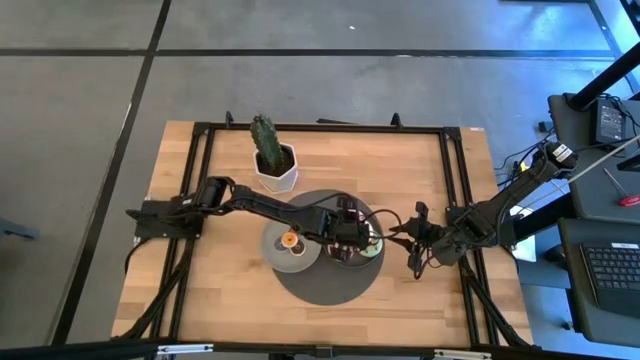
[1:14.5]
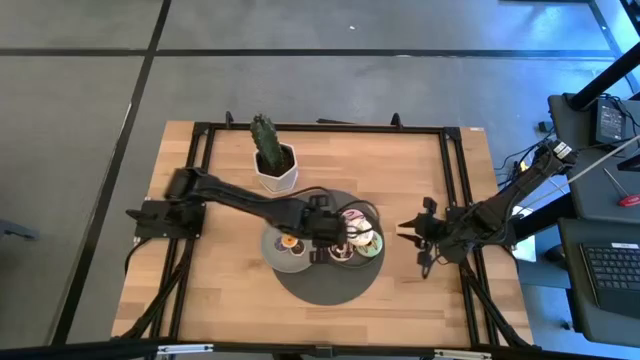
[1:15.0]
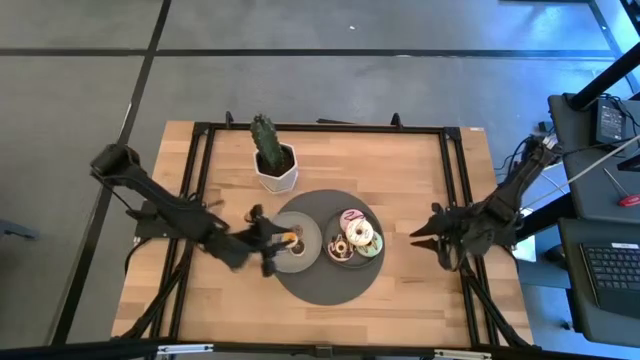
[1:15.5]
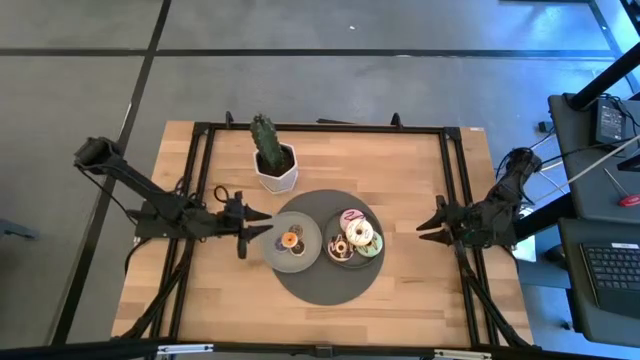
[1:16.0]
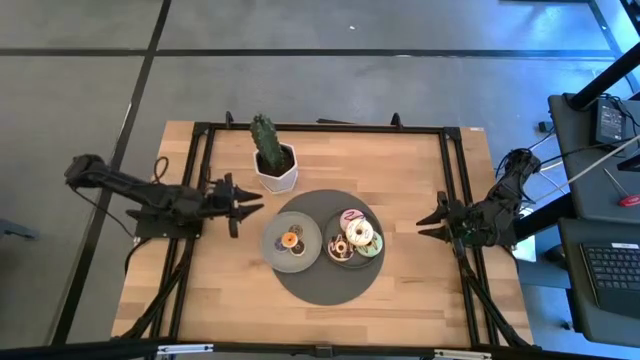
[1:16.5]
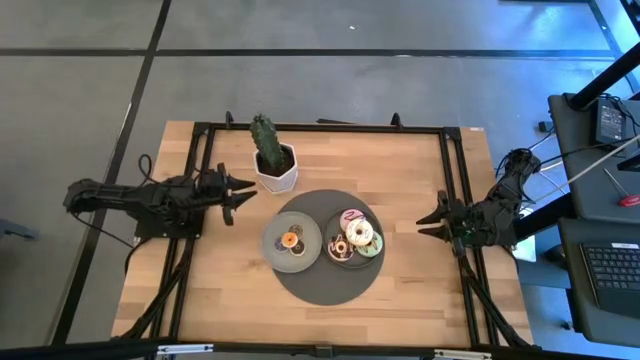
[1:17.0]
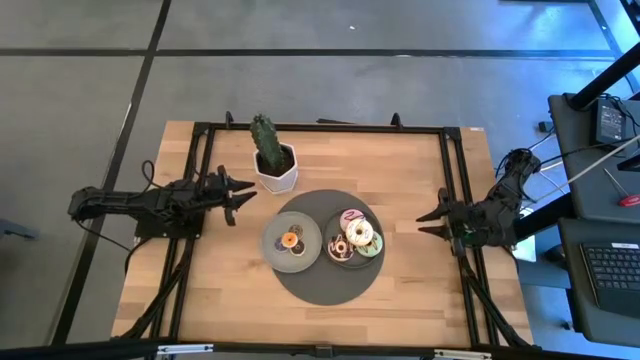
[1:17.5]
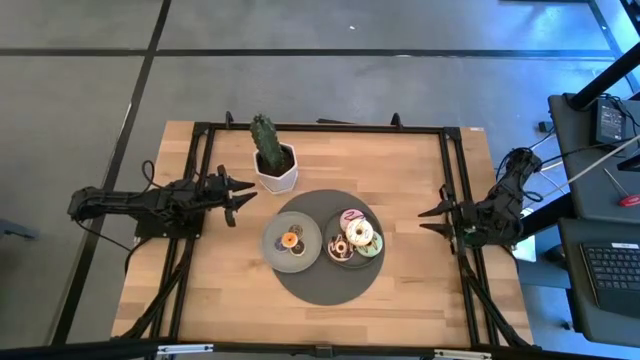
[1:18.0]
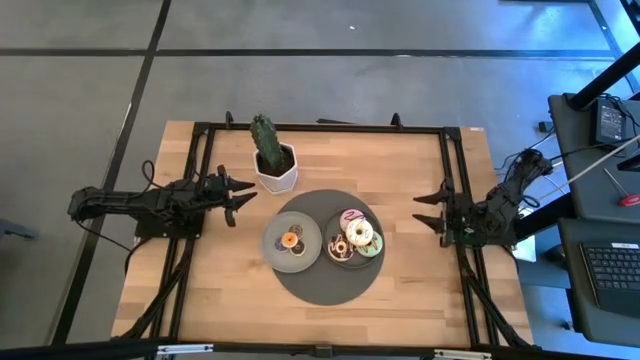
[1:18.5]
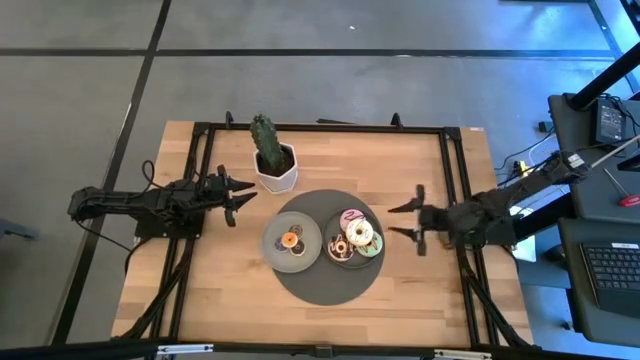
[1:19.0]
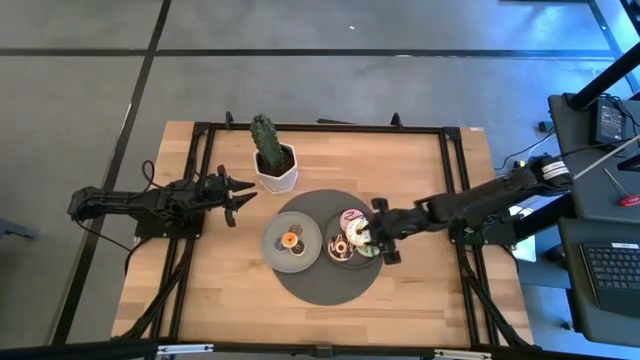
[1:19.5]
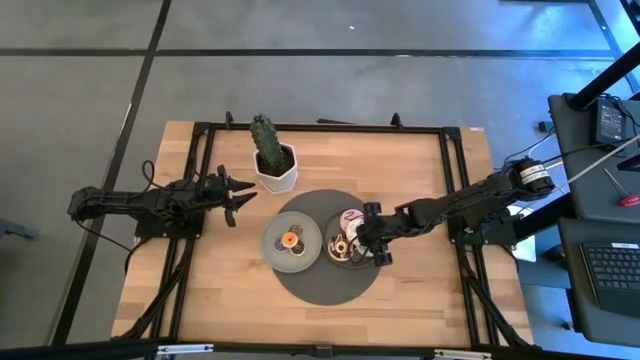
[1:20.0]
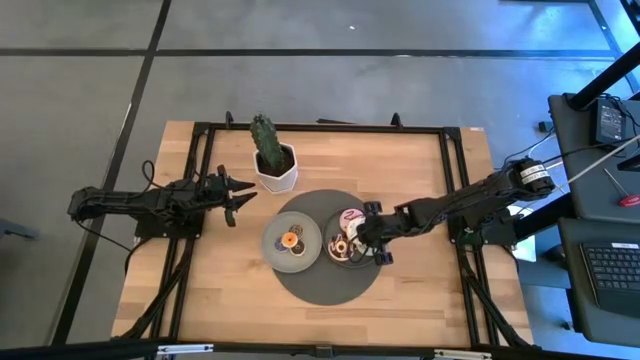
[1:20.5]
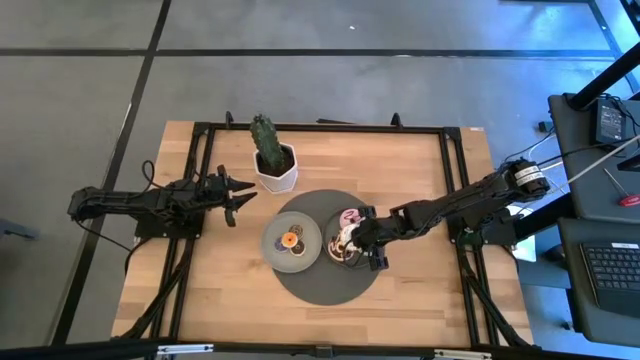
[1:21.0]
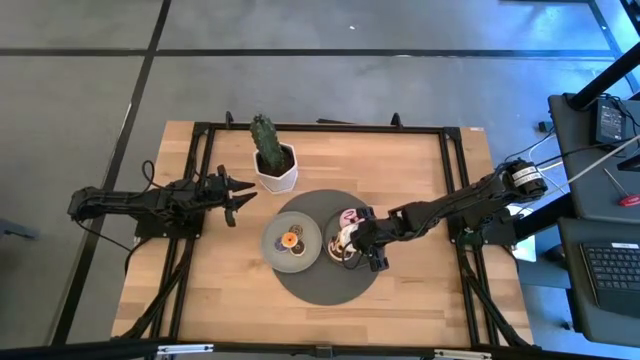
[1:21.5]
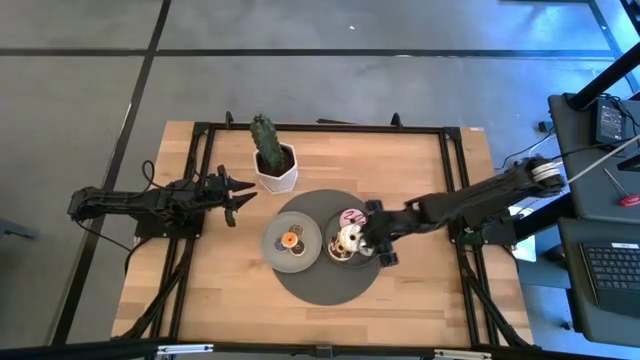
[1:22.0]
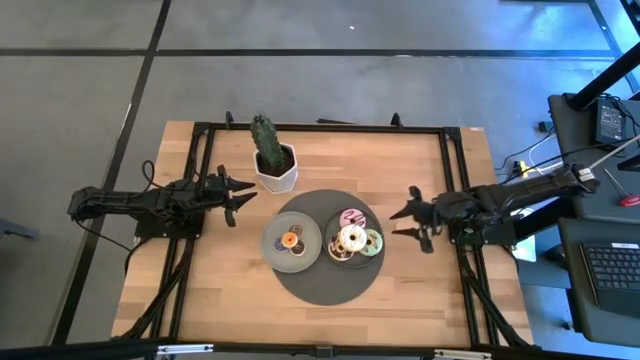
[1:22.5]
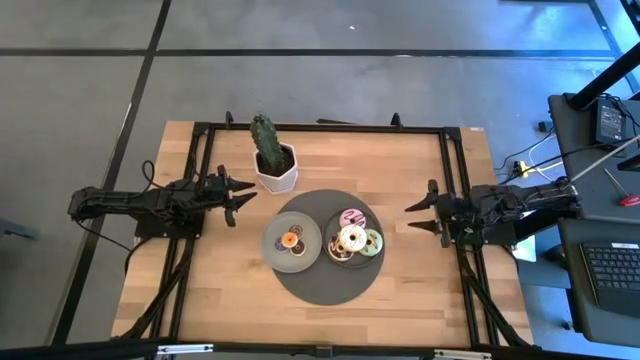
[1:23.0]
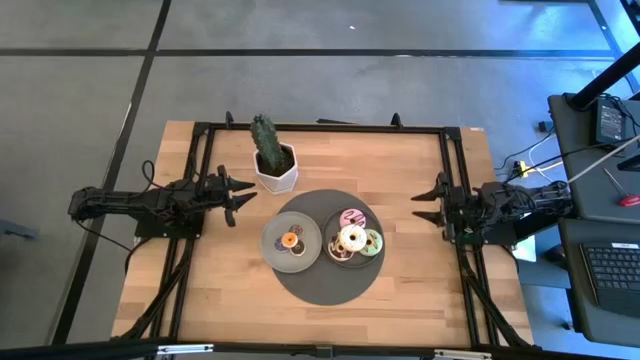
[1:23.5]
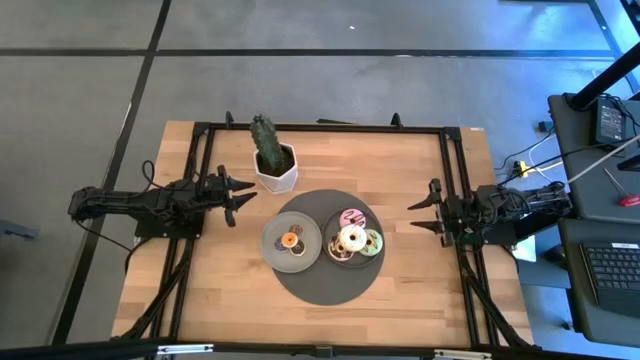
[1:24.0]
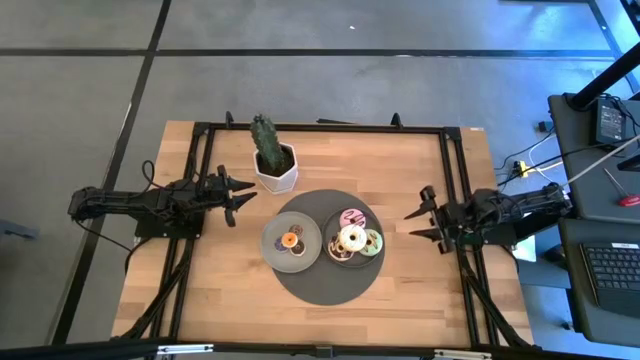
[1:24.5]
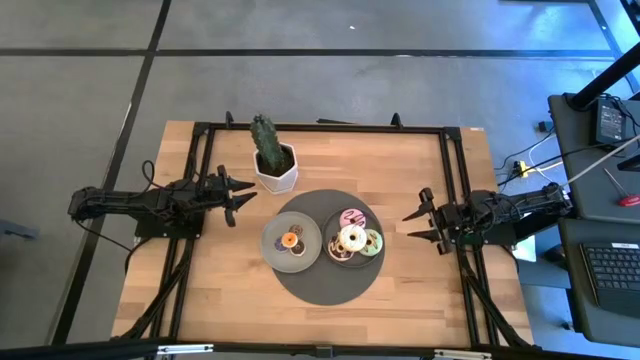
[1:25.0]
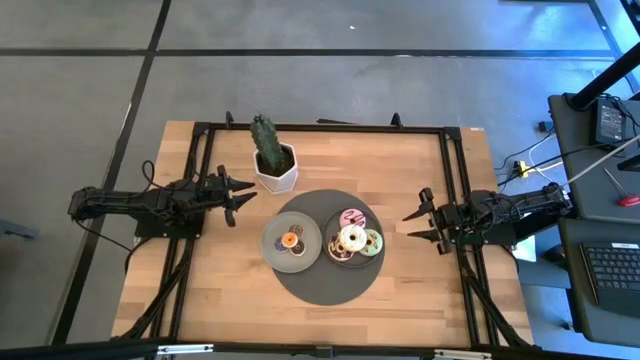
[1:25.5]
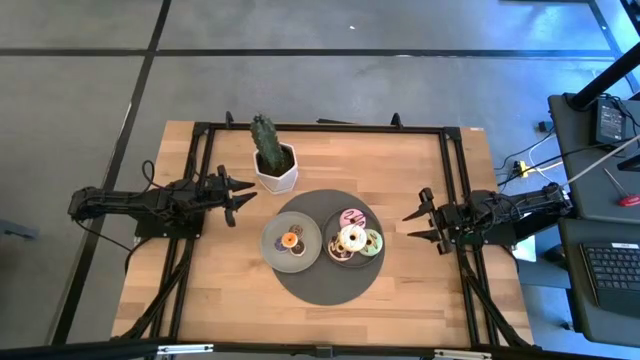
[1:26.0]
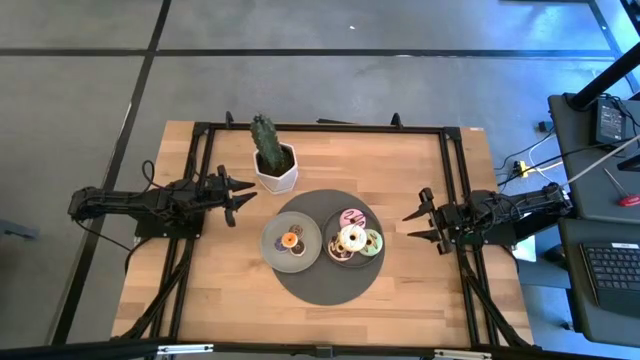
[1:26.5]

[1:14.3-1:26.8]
Task: Pick & Place donuts
Return to Home Position

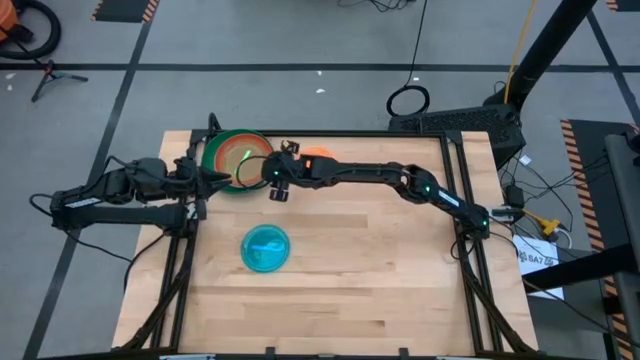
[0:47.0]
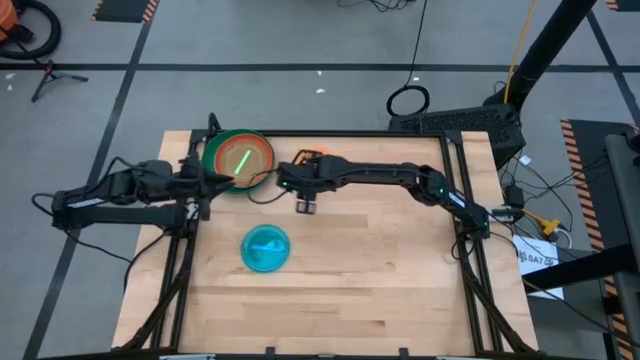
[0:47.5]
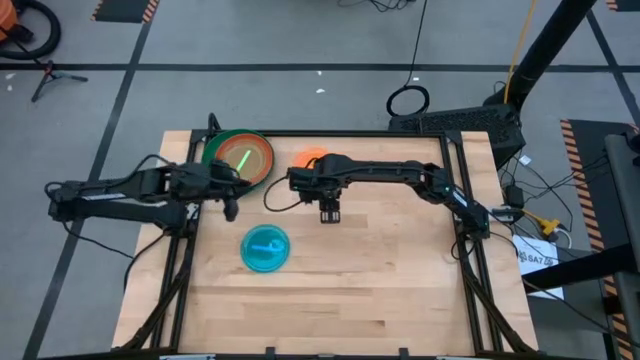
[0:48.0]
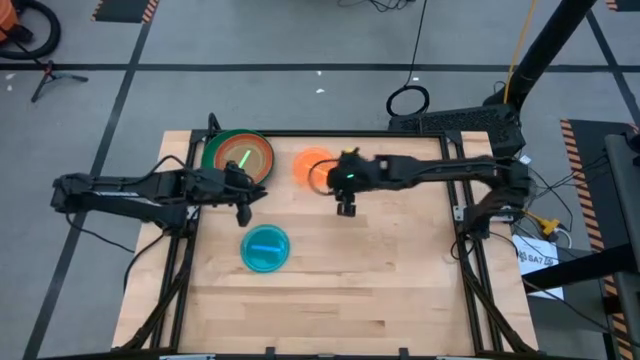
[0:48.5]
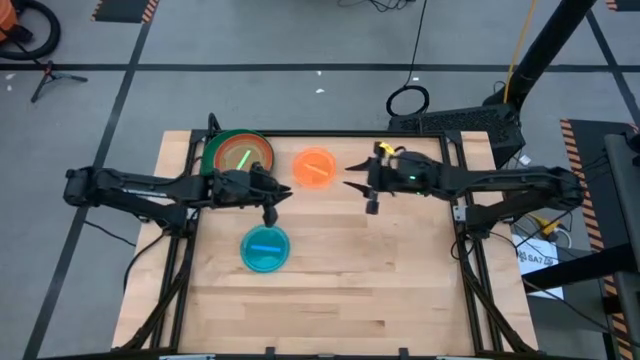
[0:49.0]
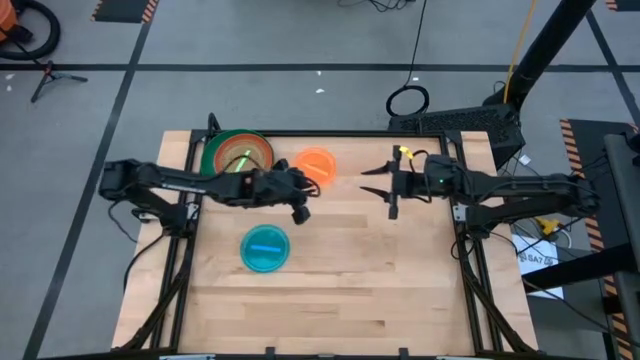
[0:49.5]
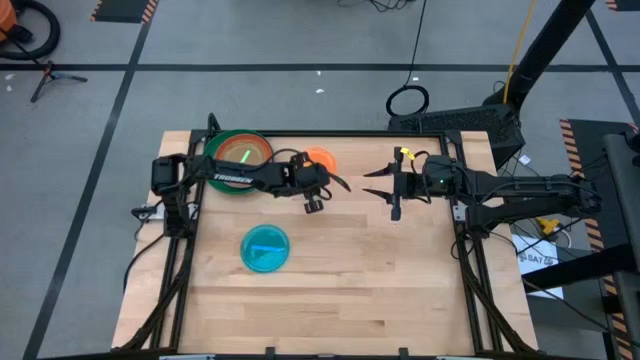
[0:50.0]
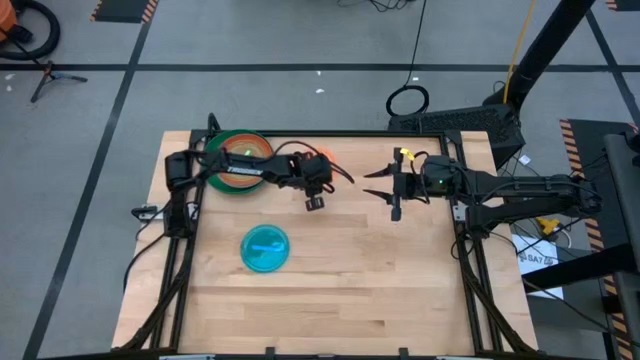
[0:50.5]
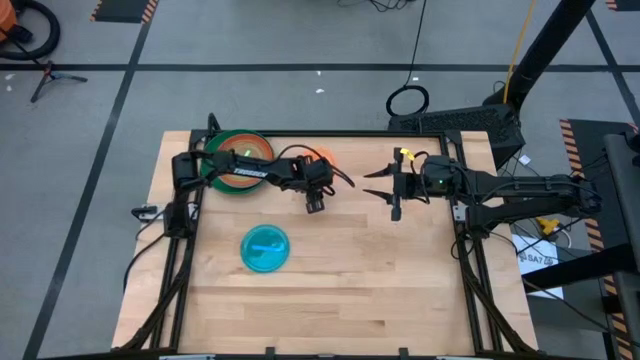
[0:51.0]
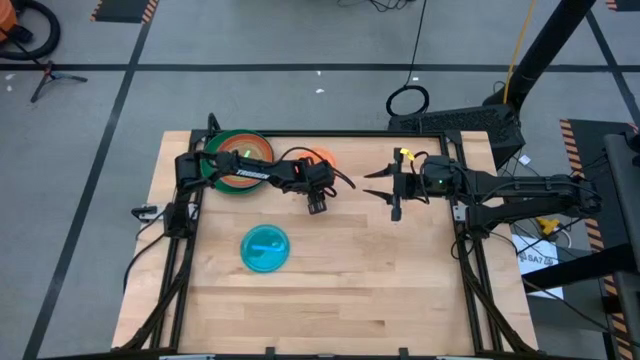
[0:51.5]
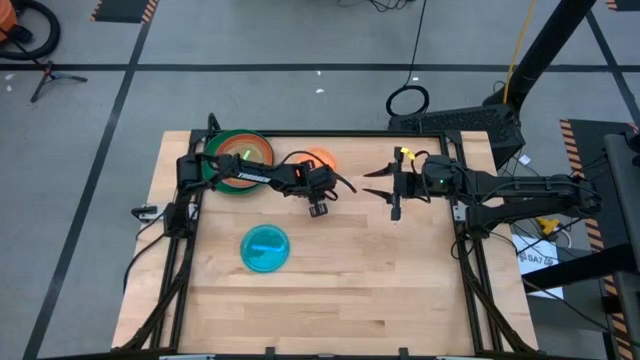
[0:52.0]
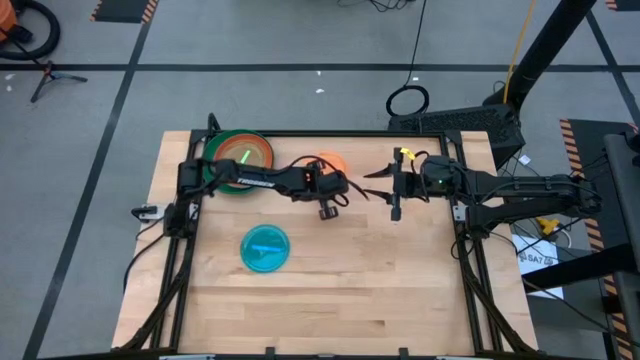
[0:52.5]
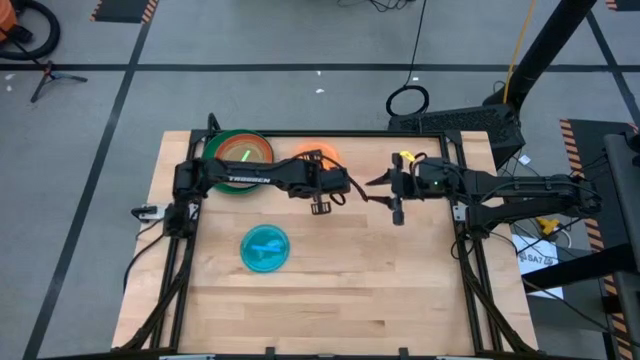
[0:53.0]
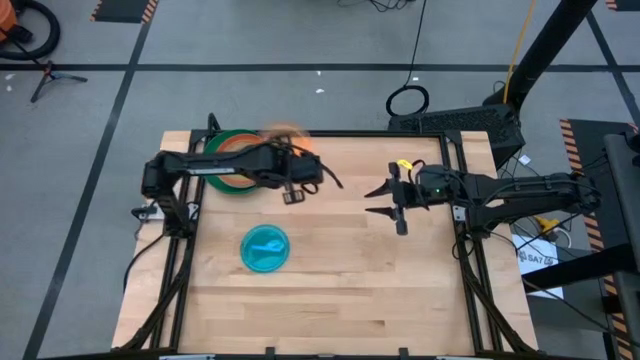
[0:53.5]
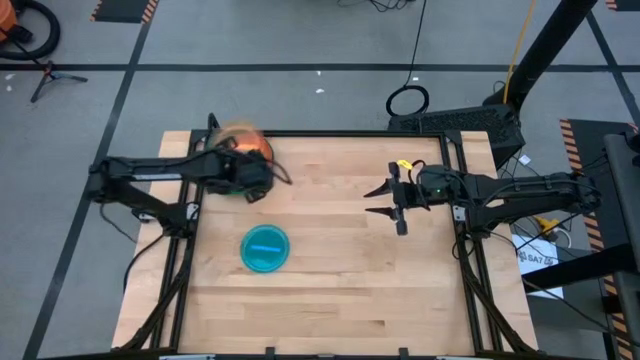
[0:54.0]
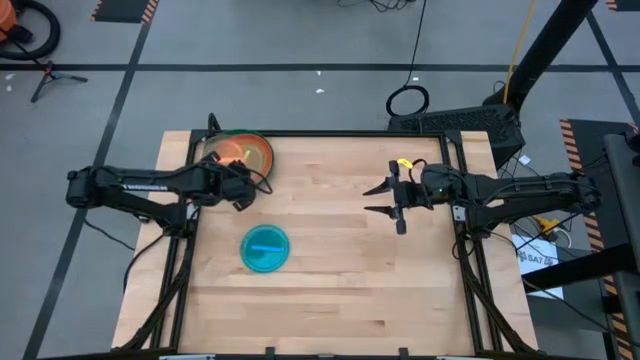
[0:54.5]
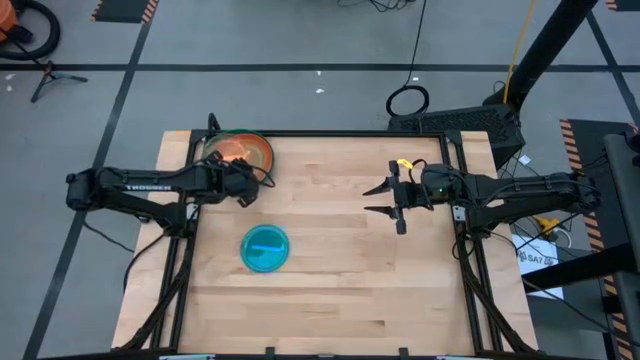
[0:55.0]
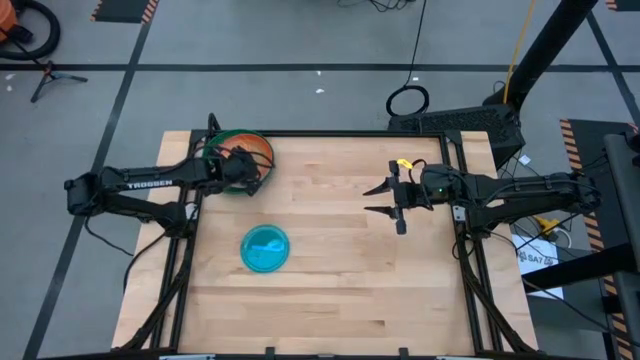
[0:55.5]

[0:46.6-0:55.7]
Task: Stack plastic plates
Stack the orange plate on top of the light green plate
